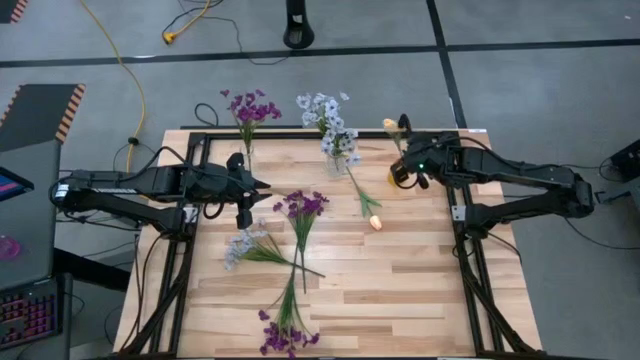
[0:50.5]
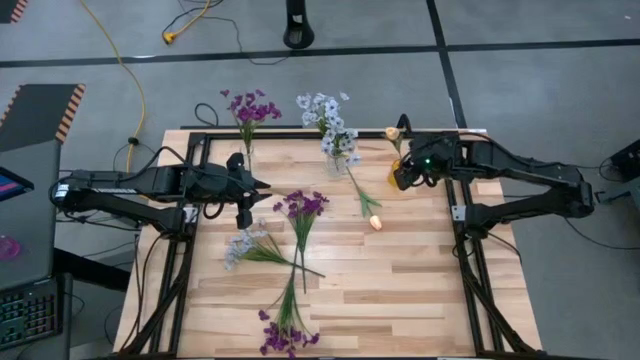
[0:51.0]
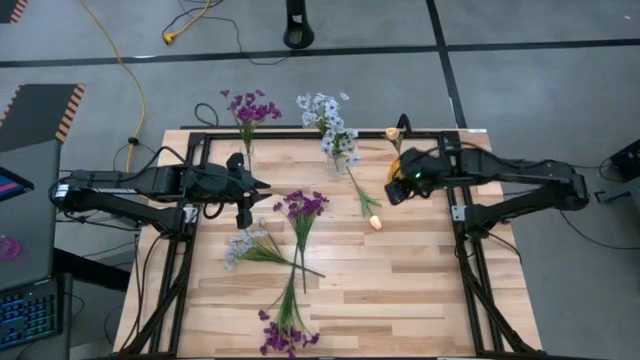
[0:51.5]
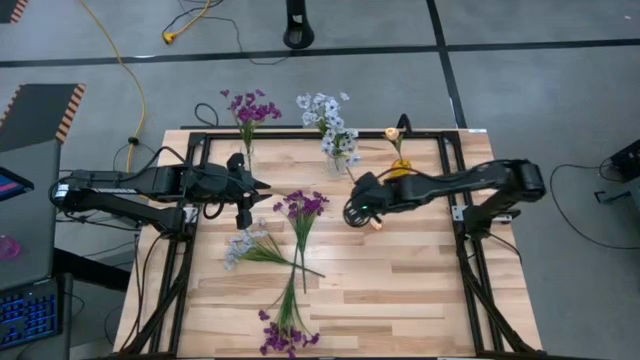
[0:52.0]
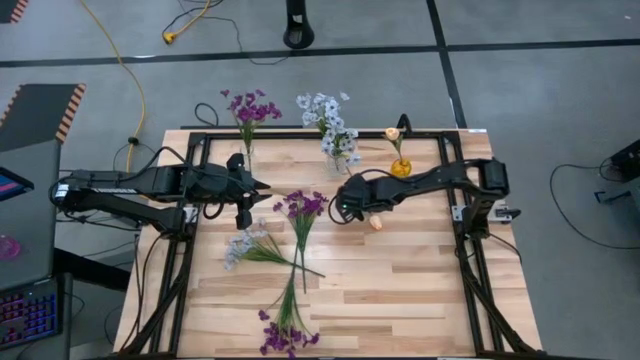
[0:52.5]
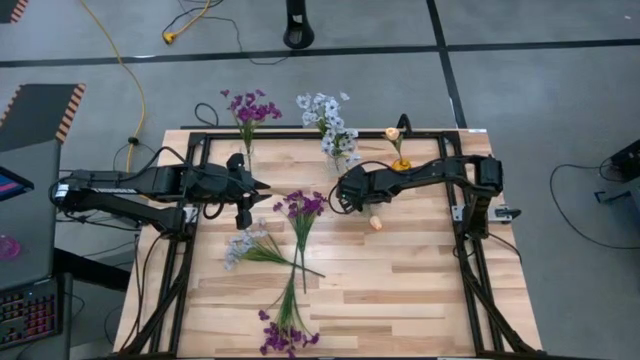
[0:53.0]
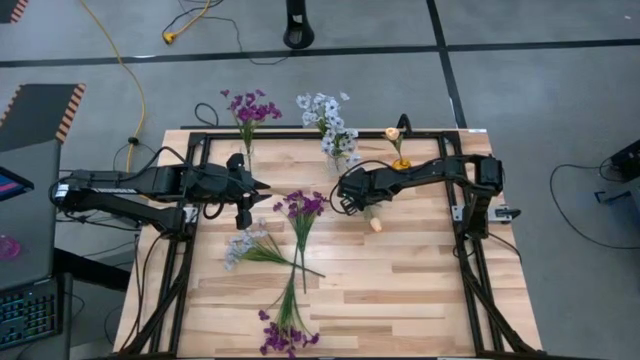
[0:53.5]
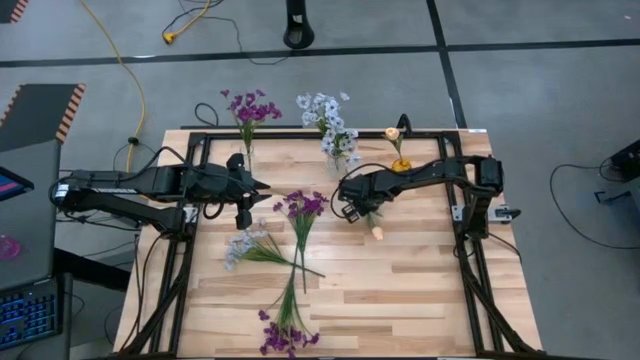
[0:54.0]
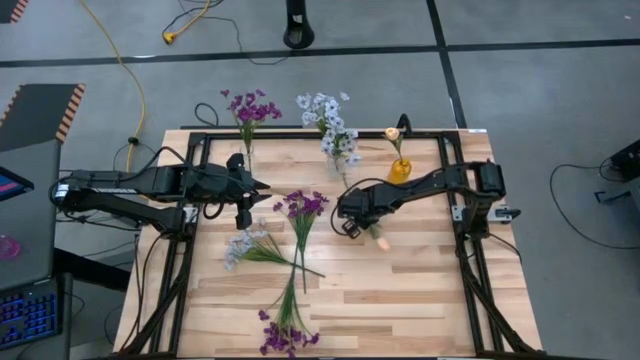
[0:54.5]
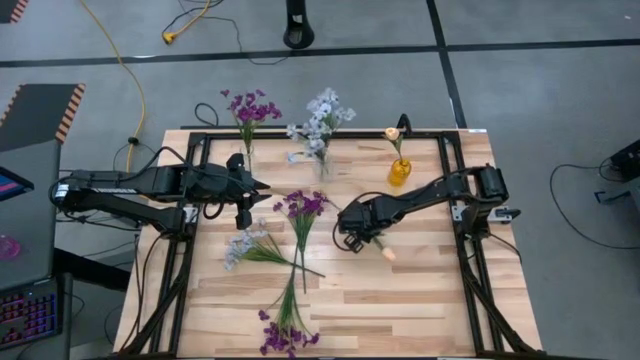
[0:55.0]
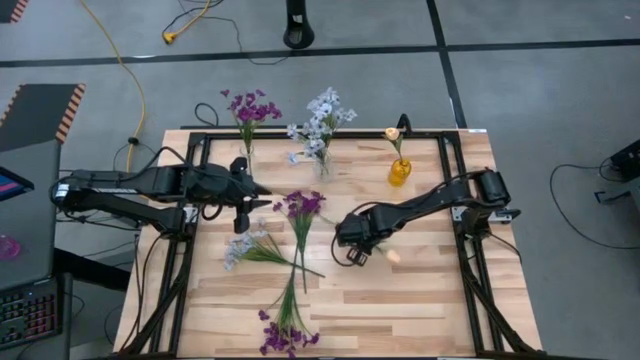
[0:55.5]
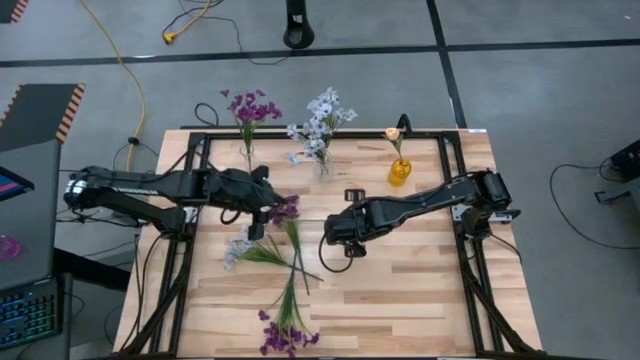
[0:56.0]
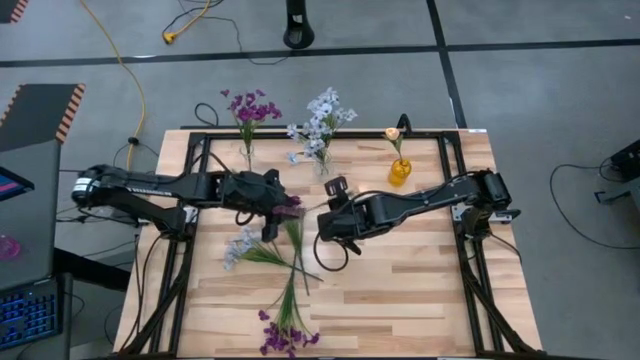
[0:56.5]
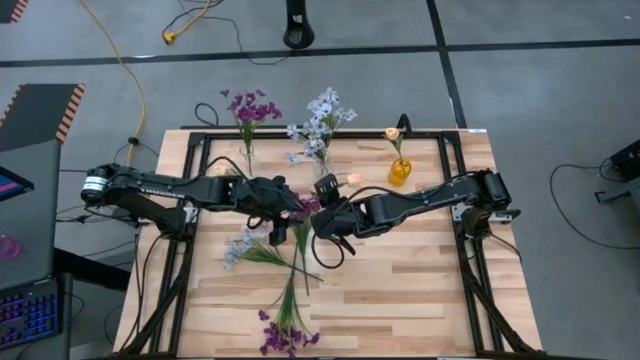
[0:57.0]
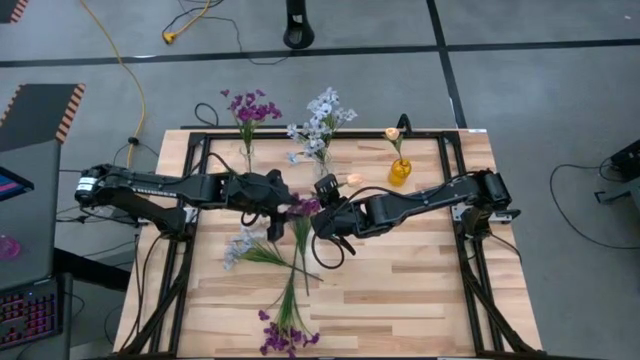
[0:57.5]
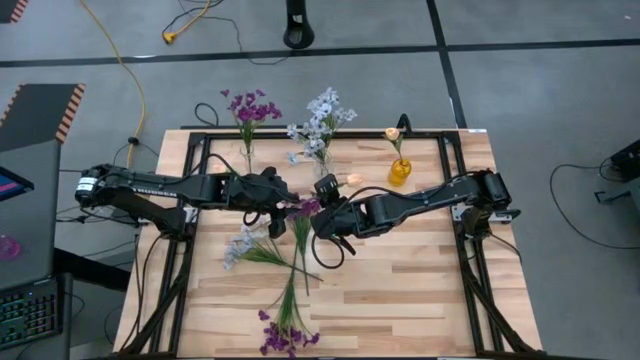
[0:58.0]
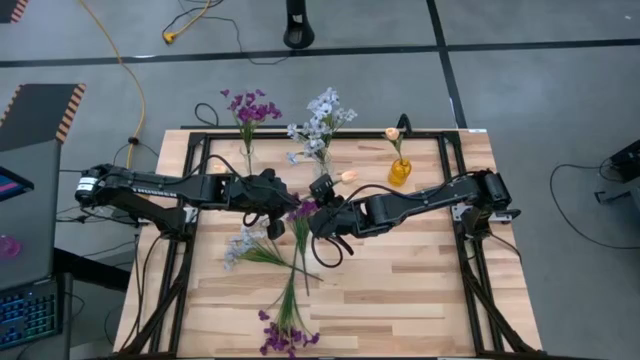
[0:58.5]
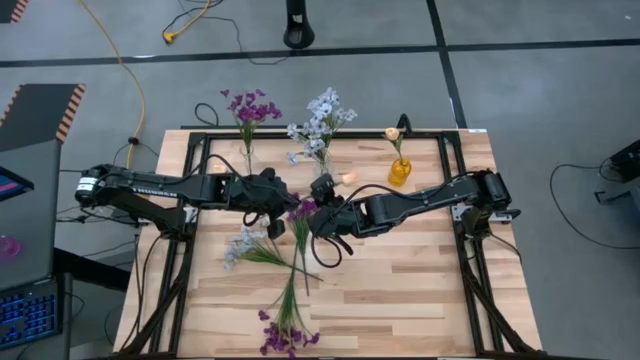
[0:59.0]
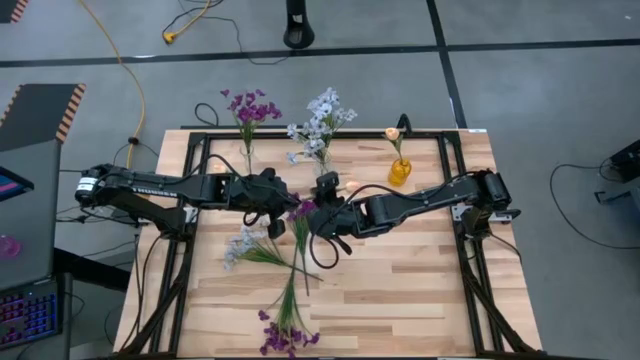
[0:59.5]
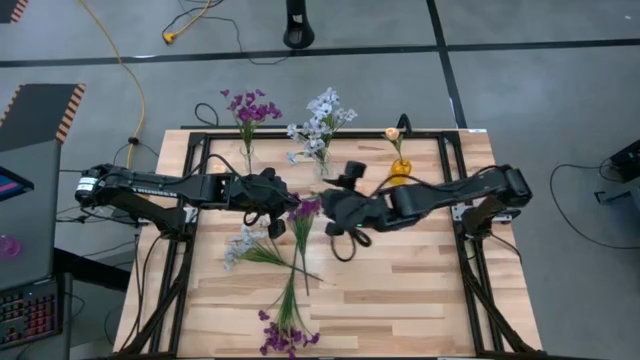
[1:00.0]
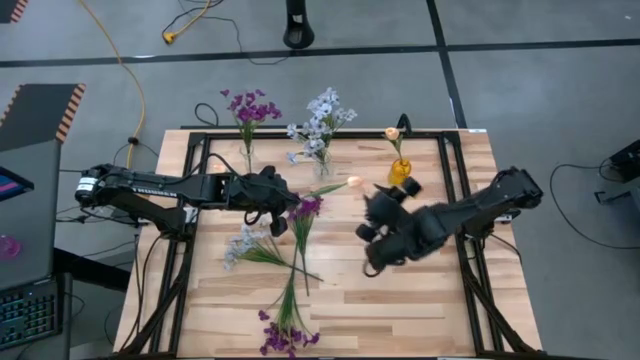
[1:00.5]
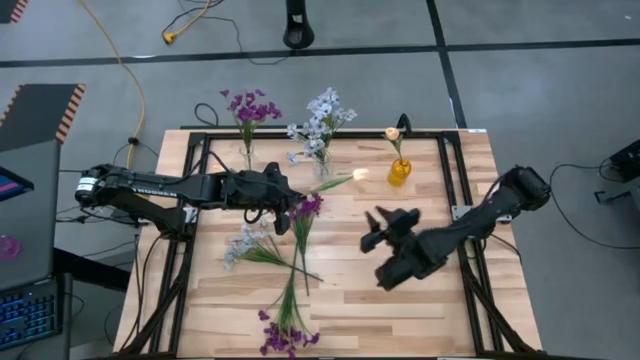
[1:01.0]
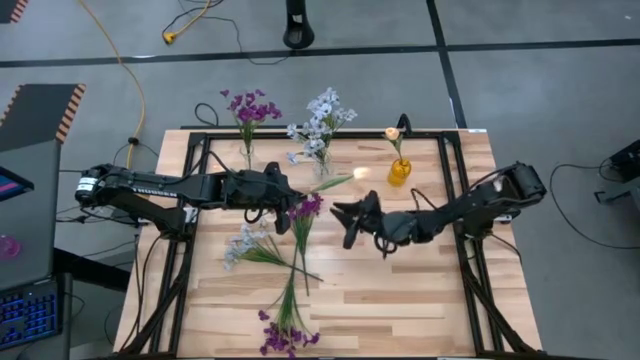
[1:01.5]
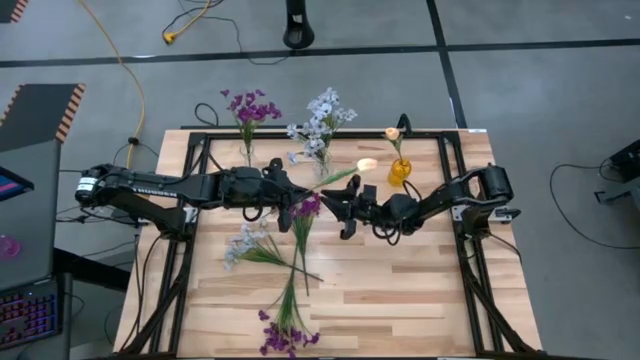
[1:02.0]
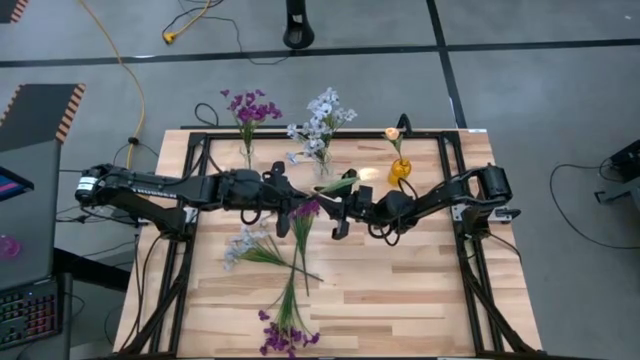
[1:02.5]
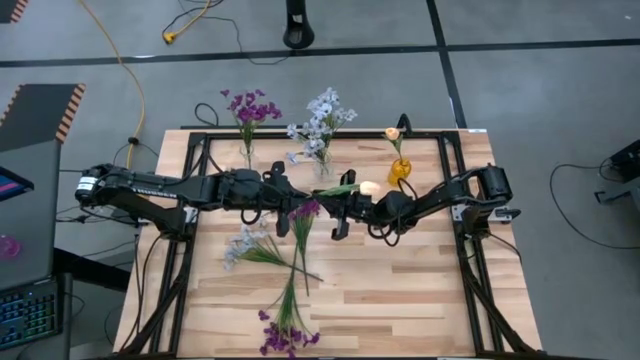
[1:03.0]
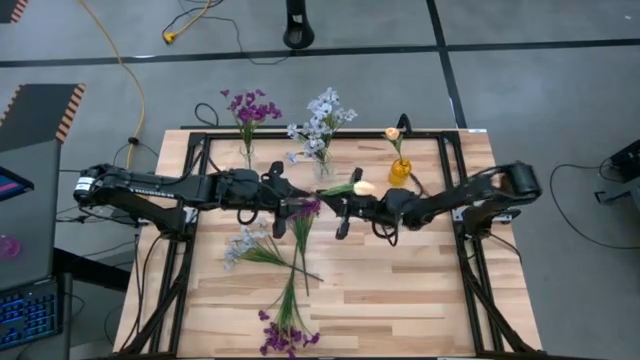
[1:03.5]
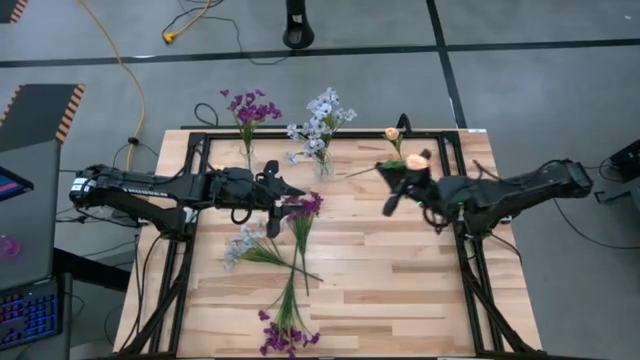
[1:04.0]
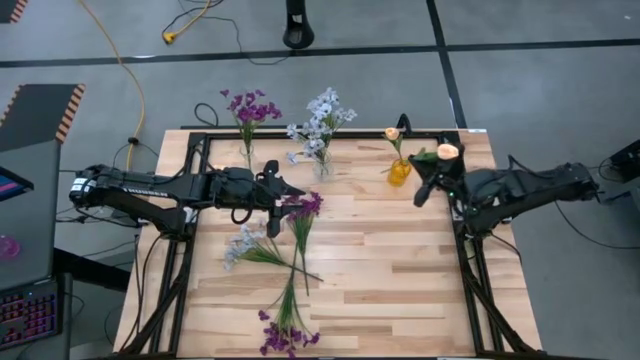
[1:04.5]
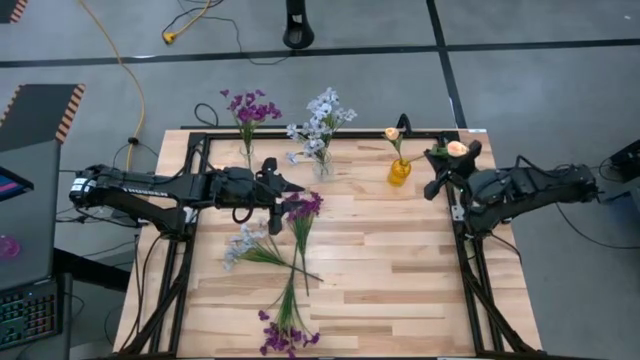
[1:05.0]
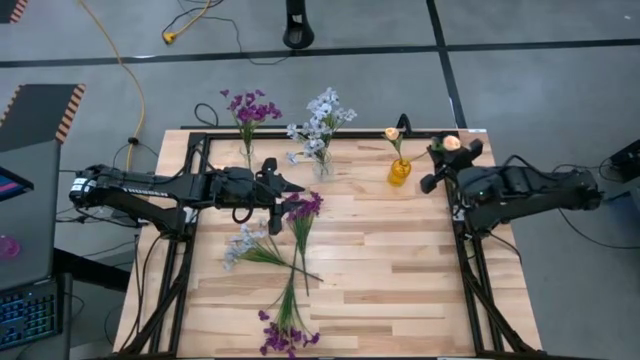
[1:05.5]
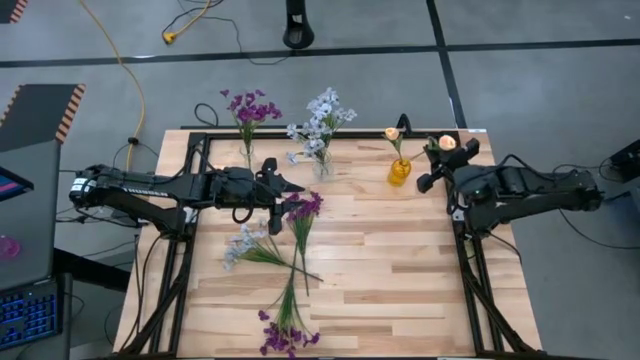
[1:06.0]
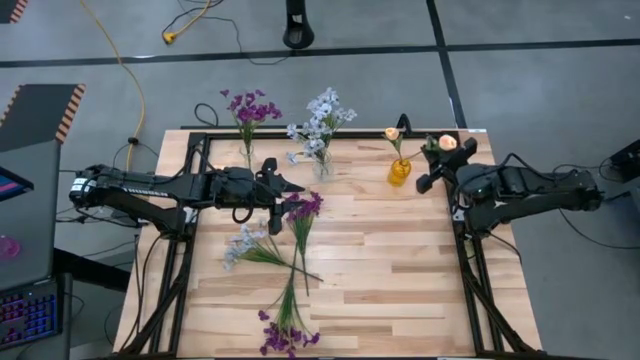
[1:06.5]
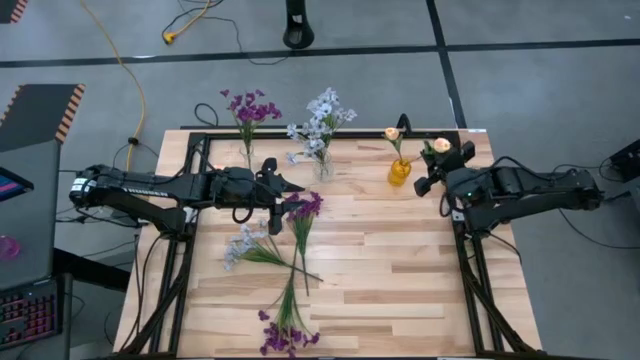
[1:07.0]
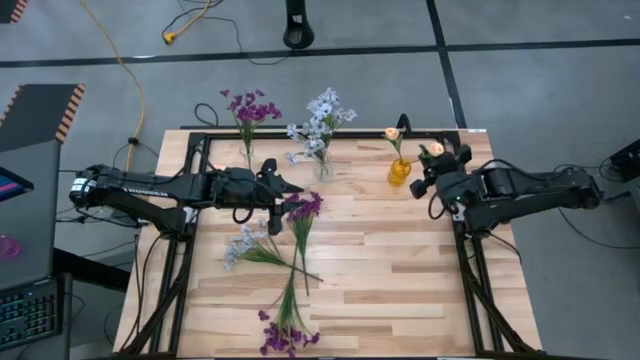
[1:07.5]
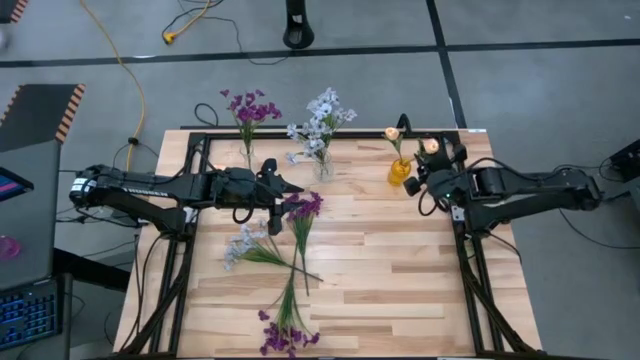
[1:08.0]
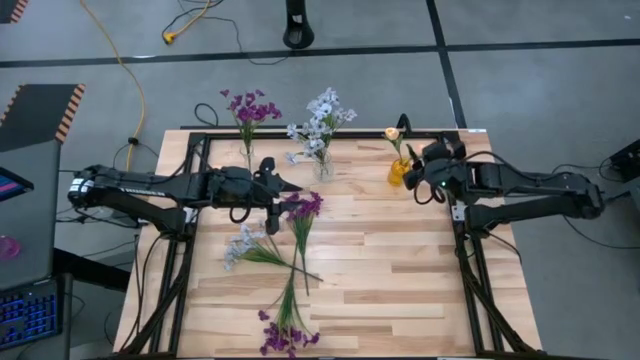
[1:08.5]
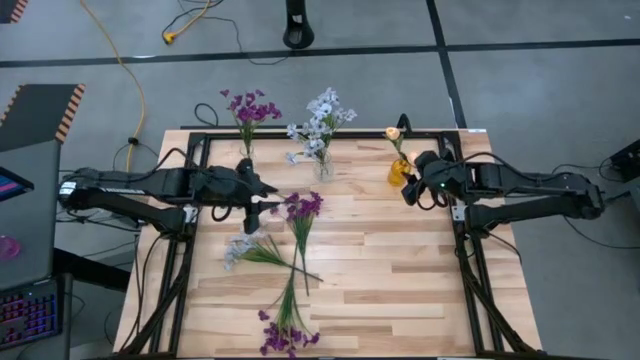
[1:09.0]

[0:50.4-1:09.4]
Task: Sort flowers into vase by color
Put the bottom yellow tulip into the yellow vase
